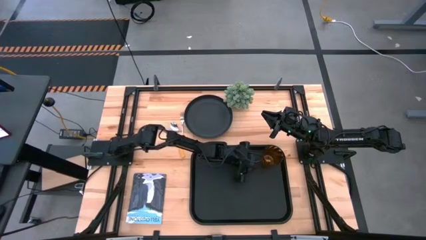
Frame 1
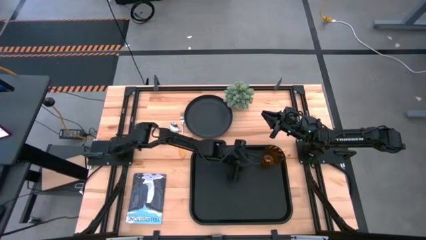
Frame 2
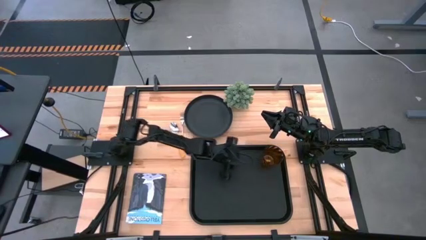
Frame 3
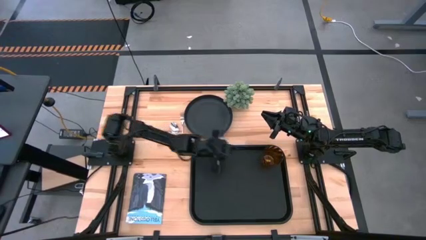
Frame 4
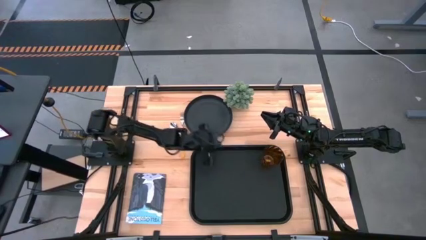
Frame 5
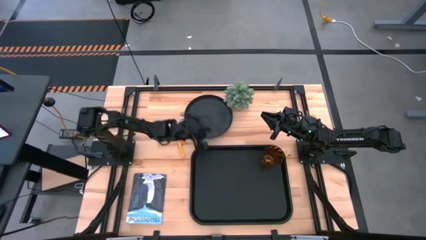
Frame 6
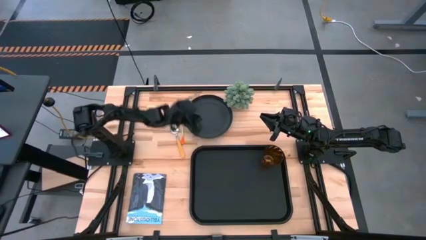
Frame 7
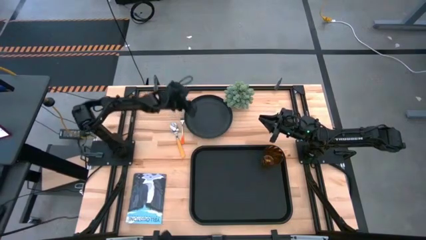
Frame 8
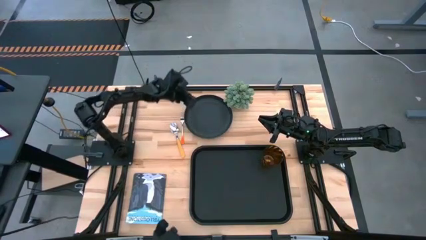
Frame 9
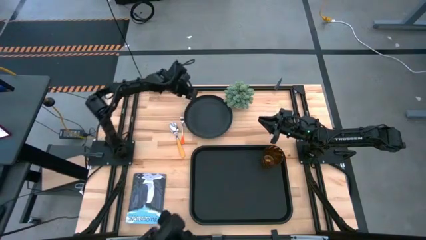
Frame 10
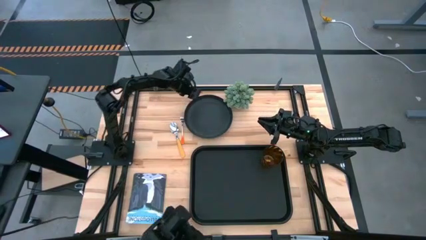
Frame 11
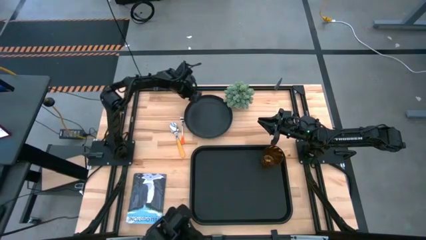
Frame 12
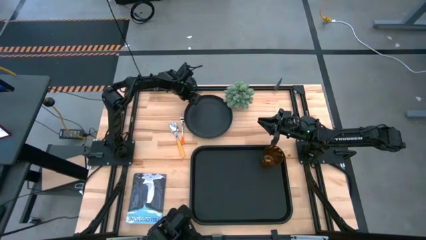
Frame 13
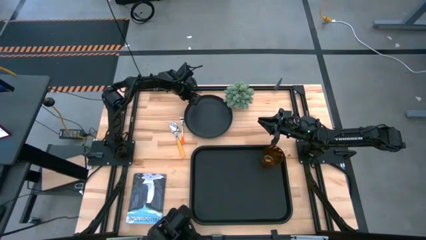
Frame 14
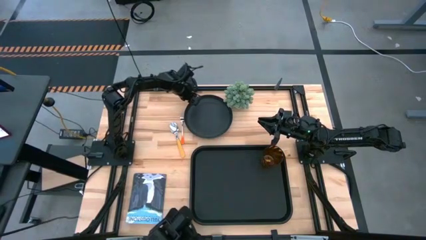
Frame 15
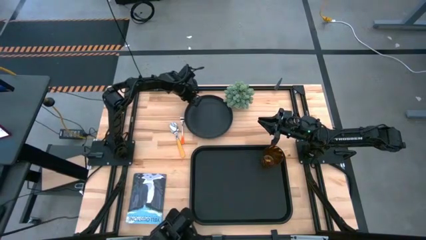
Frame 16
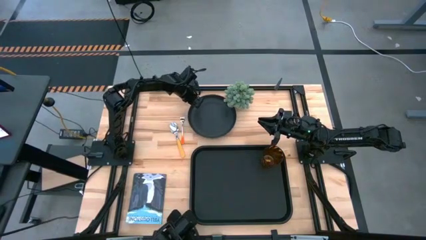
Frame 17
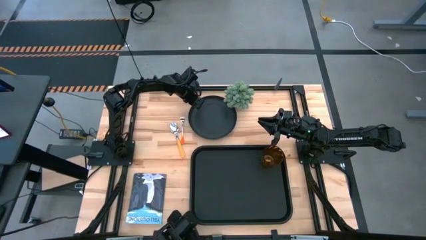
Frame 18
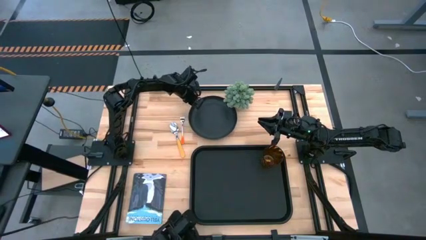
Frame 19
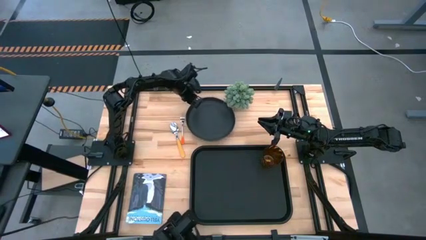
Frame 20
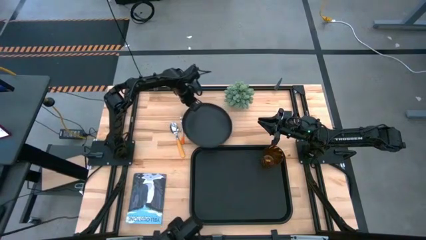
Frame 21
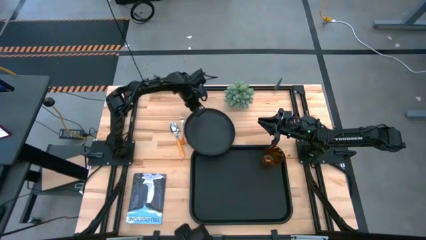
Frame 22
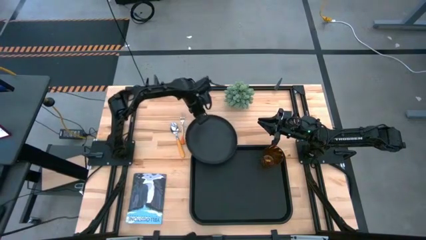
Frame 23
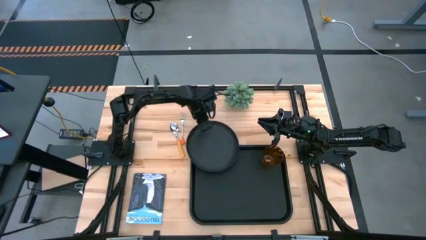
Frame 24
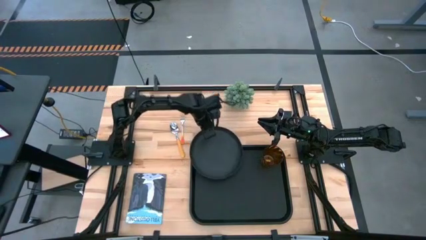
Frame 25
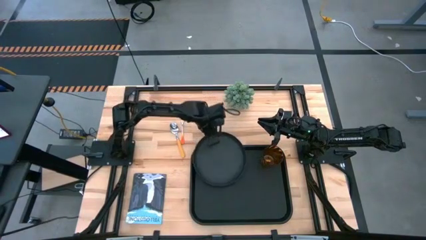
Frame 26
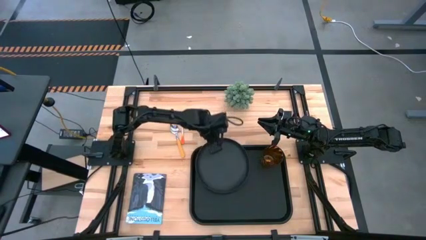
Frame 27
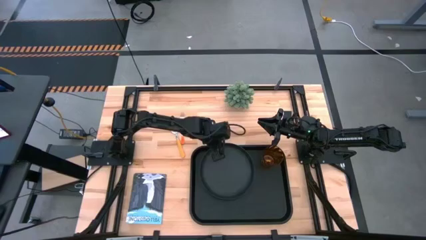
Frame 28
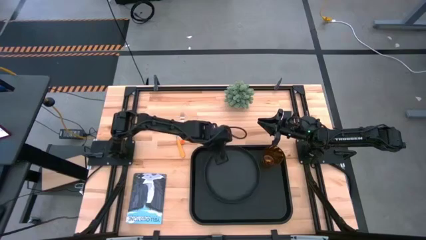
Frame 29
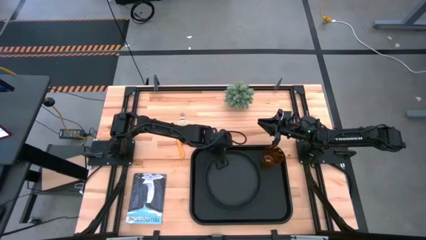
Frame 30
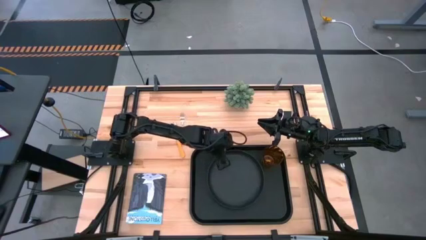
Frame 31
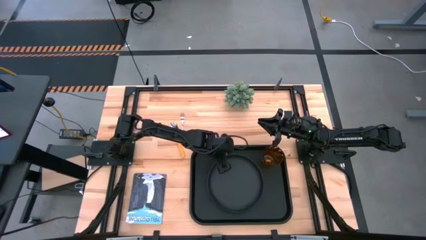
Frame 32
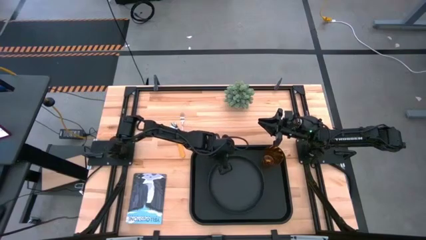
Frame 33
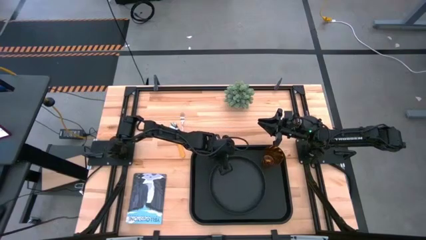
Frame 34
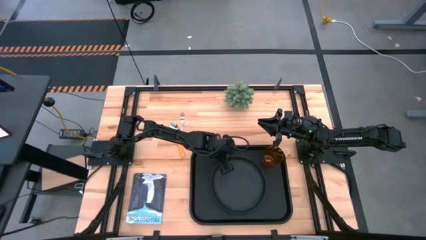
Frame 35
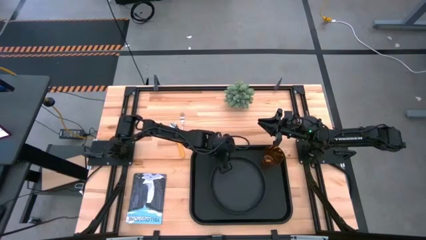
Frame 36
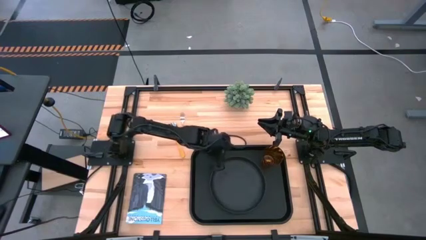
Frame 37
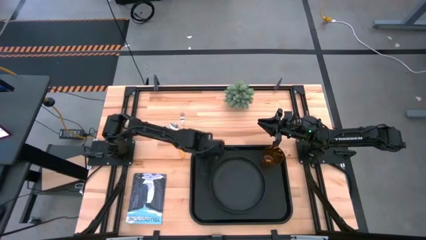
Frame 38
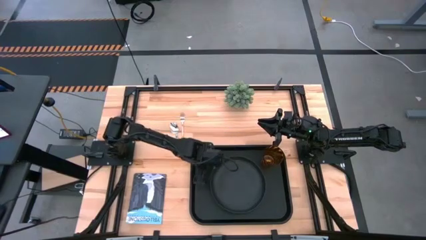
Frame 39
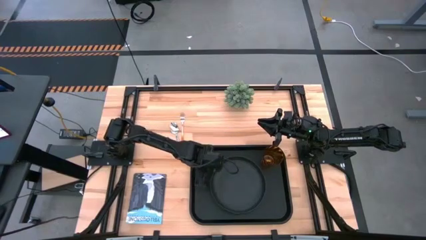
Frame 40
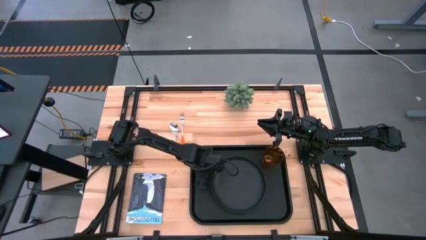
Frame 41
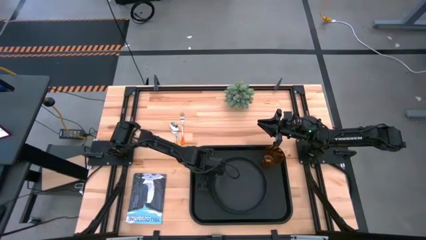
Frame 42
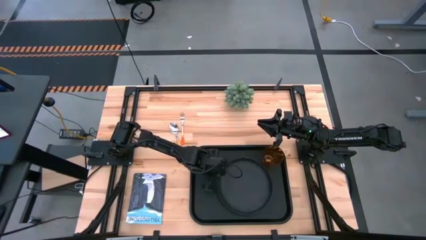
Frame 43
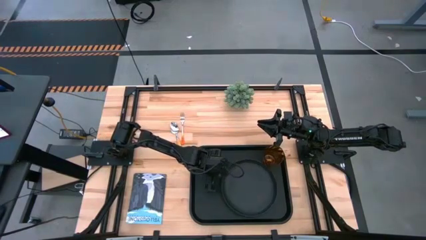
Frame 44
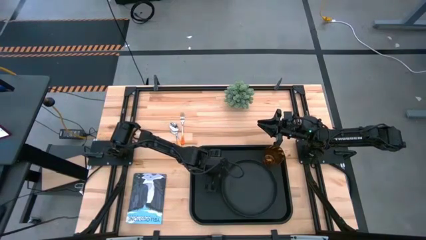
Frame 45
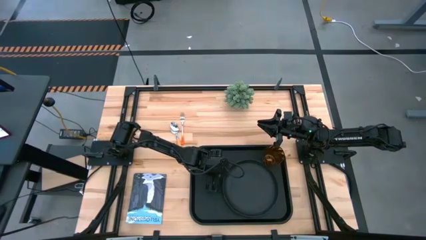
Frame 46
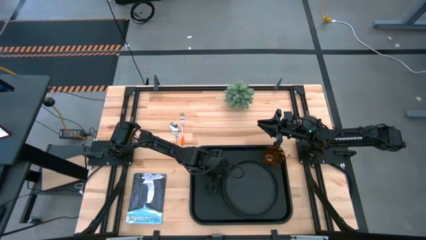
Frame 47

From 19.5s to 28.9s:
Task: Pick and place plate/cup/fork/spoon on tray
Put the black plate on the center of the black serving tray

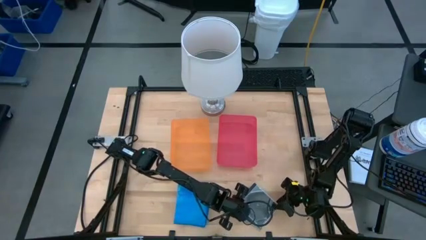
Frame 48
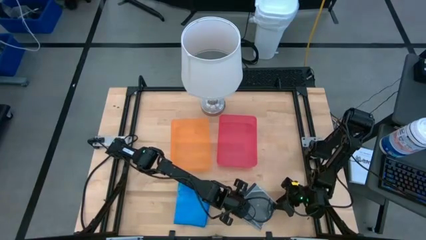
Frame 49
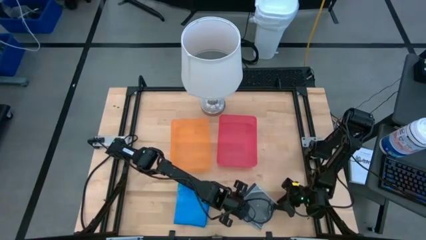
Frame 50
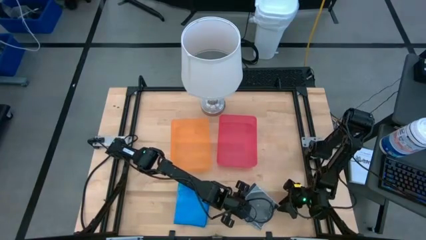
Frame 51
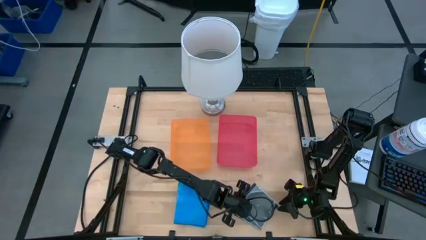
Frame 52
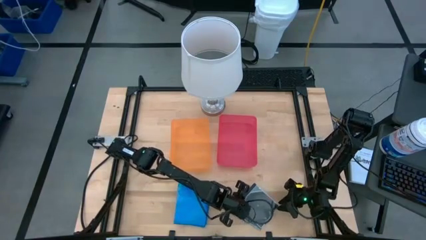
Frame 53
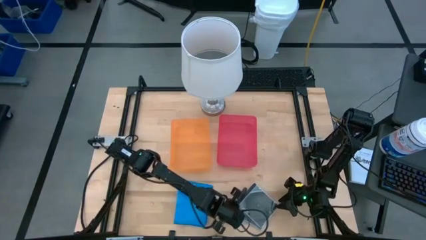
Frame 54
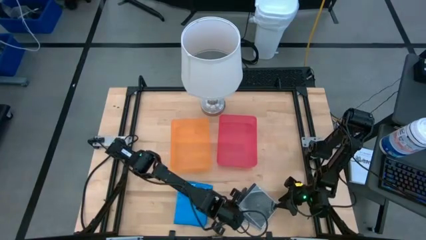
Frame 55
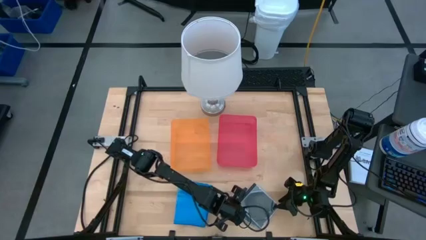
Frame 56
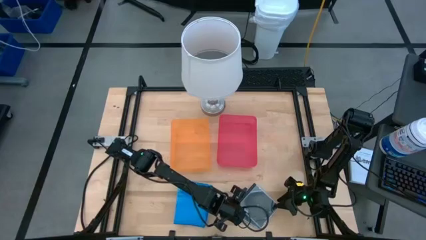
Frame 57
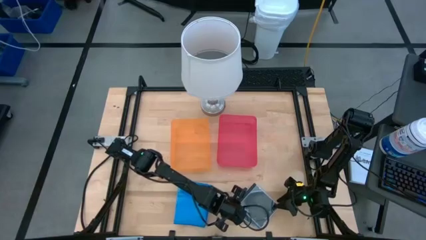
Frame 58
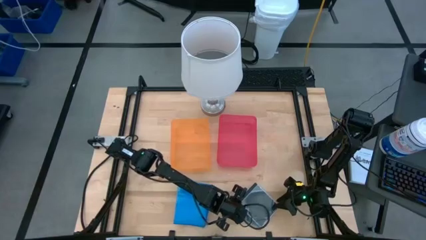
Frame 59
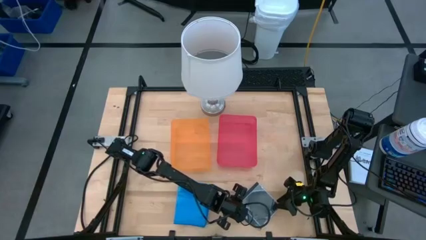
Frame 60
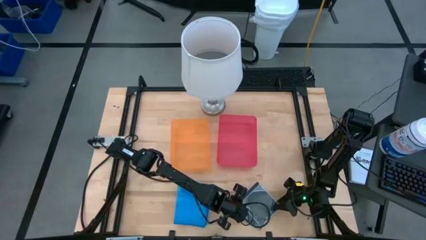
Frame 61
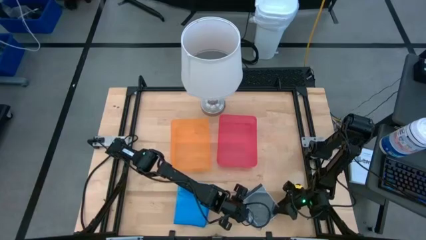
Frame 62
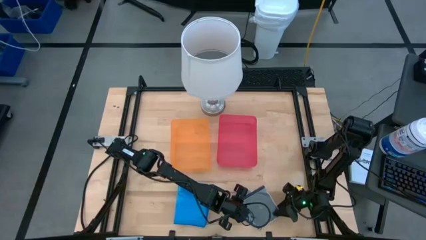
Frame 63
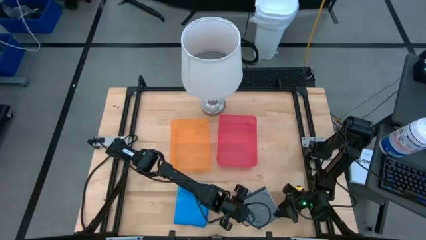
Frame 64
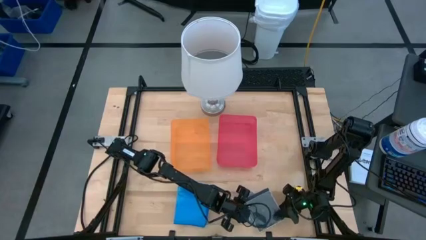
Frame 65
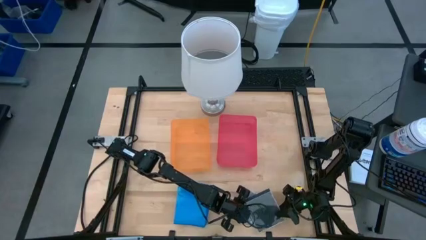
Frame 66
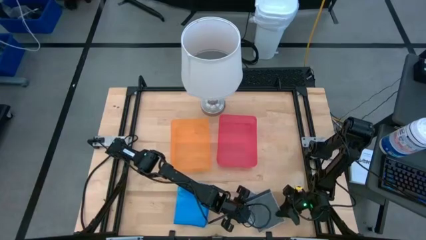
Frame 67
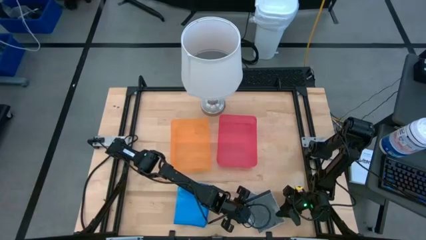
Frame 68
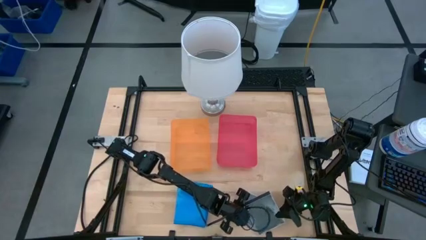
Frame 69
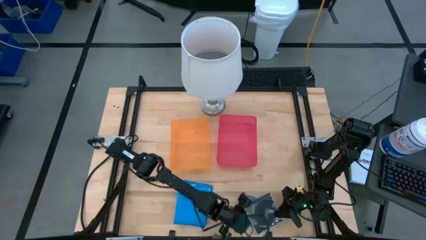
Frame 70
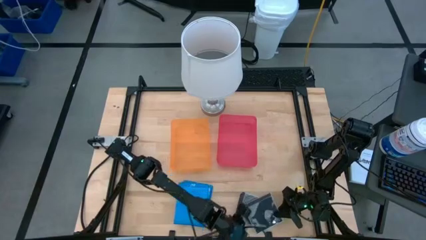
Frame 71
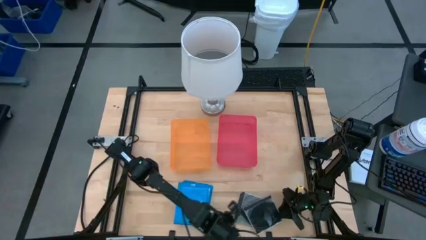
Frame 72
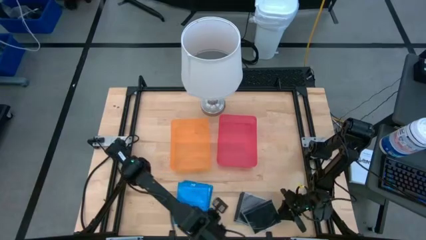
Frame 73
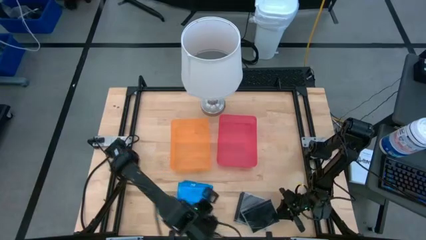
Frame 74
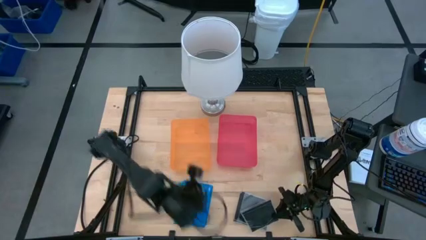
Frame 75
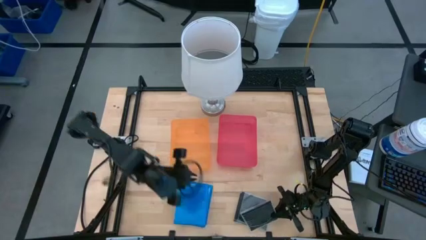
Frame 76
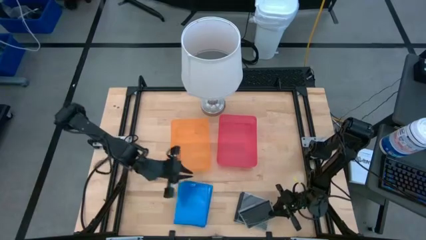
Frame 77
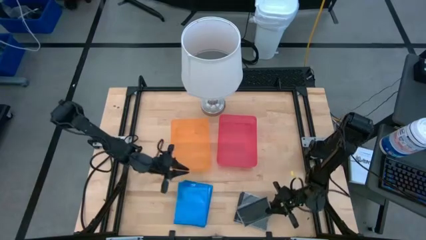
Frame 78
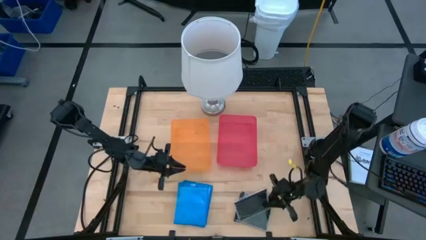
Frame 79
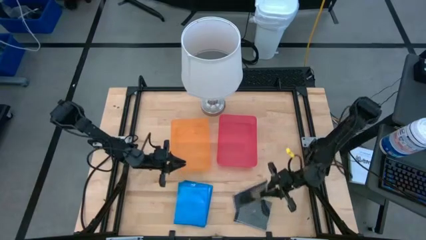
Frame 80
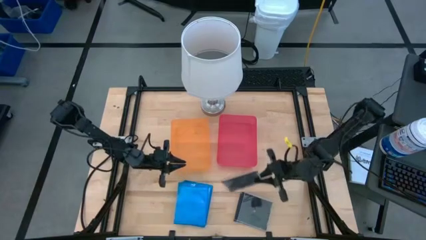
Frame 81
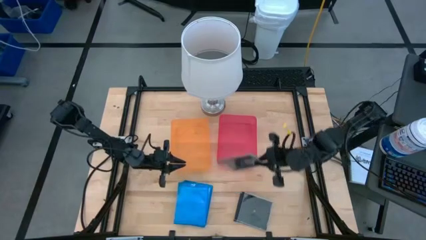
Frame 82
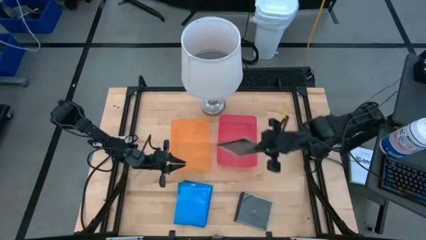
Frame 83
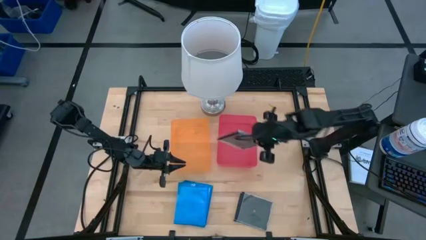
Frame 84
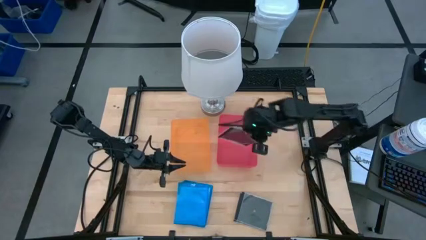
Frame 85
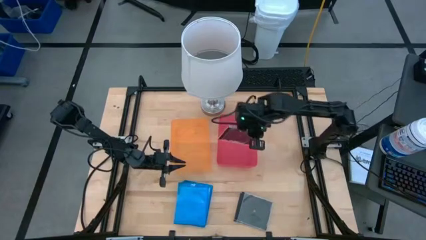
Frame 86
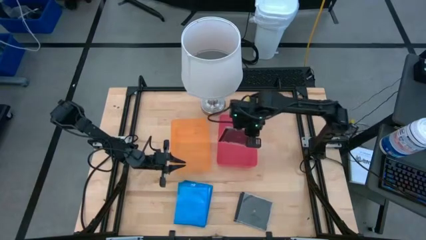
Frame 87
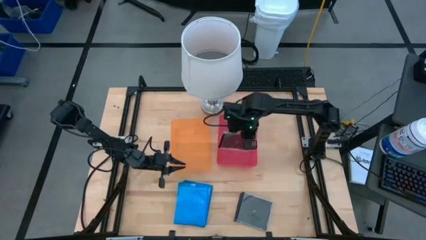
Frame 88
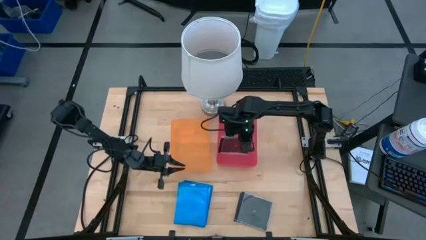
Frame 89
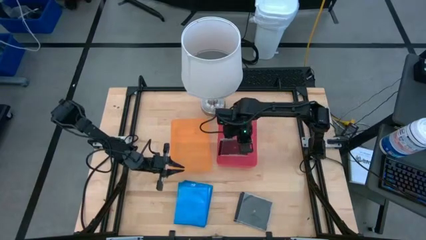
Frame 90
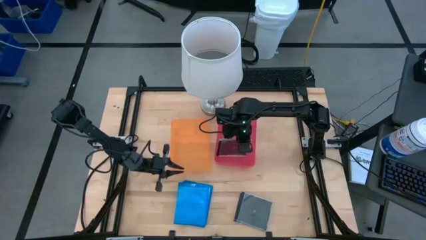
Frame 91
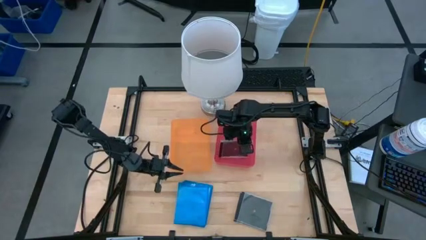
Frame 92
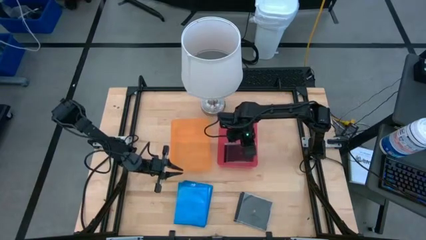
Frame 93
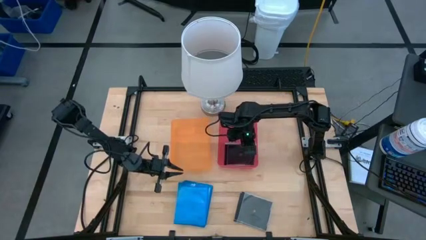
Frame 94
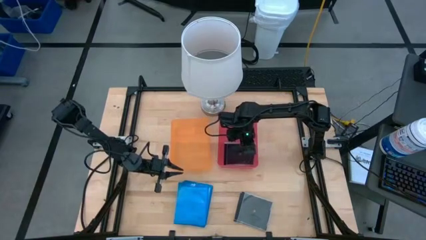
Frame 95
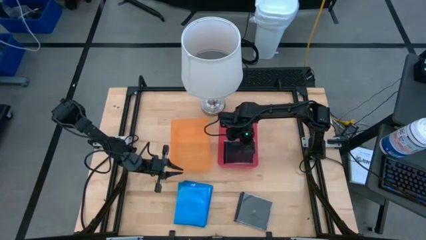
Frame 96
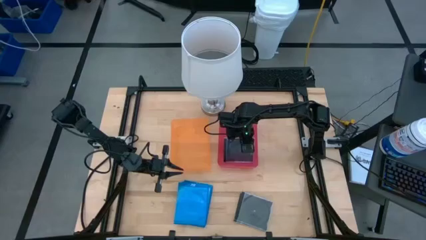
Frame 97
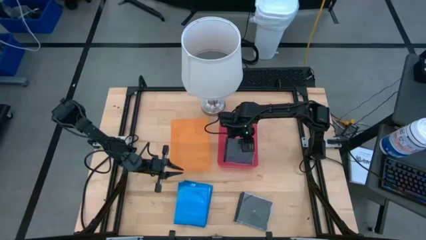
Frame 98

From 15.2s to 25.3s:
Task: Pick & place jewel cases by type
Put the black CD case into the red bin
